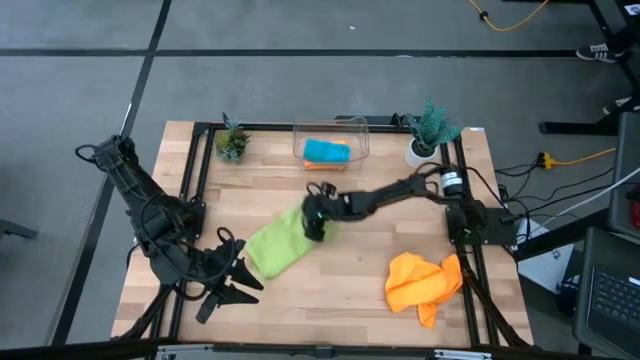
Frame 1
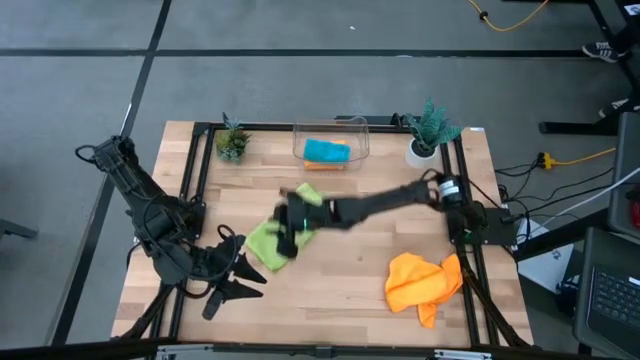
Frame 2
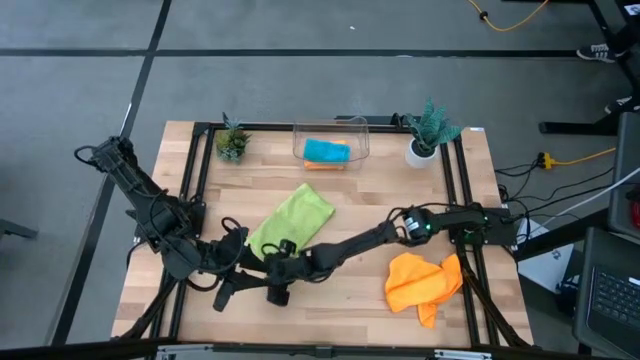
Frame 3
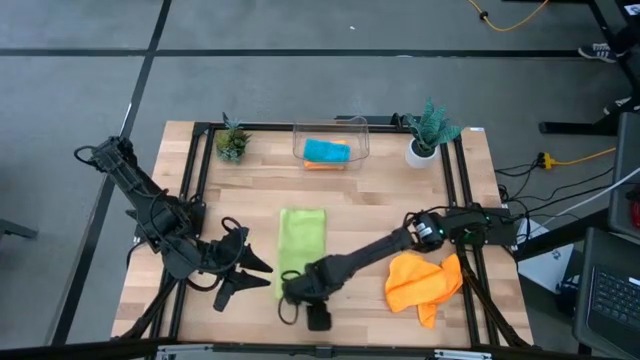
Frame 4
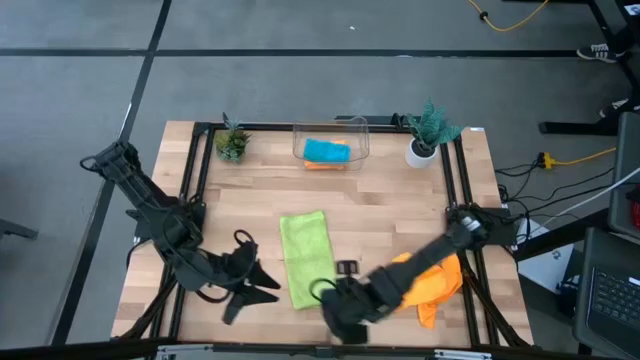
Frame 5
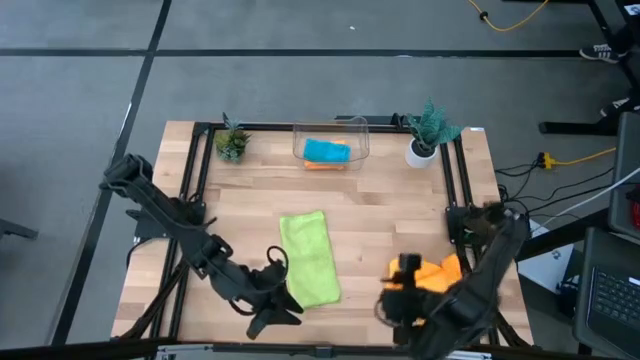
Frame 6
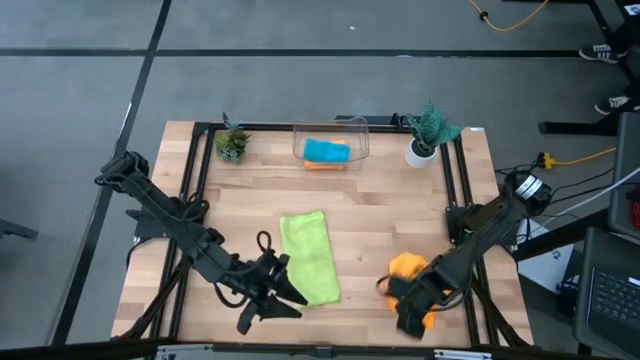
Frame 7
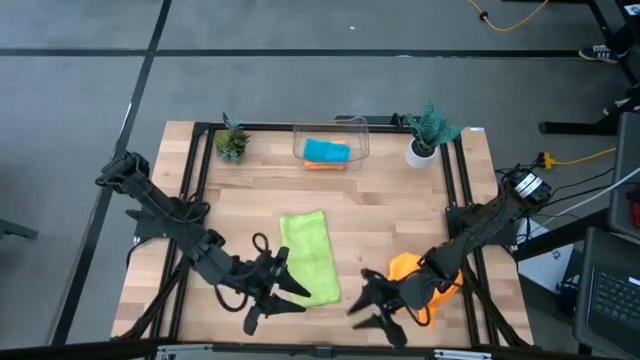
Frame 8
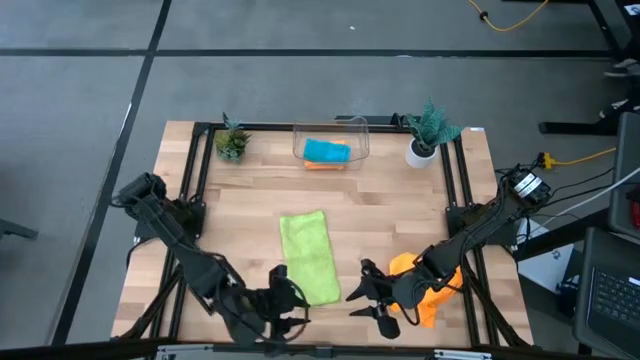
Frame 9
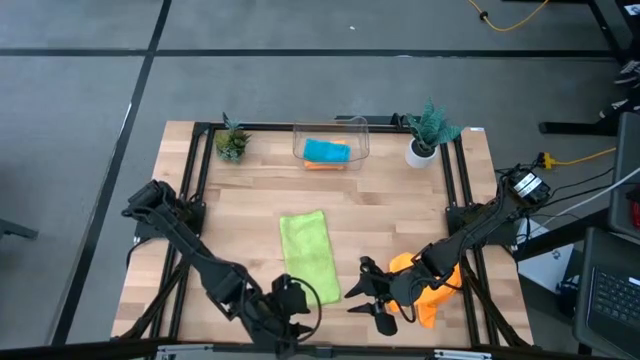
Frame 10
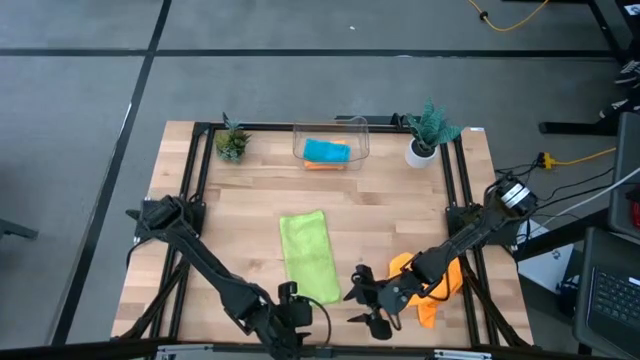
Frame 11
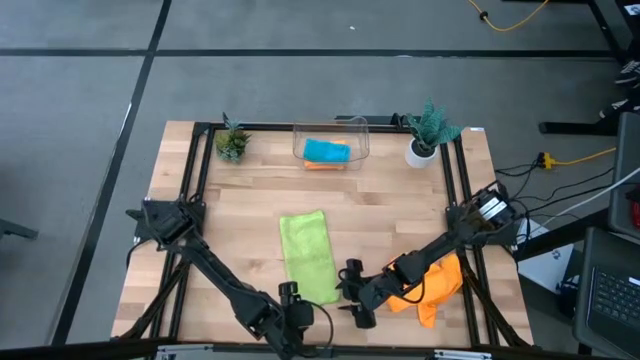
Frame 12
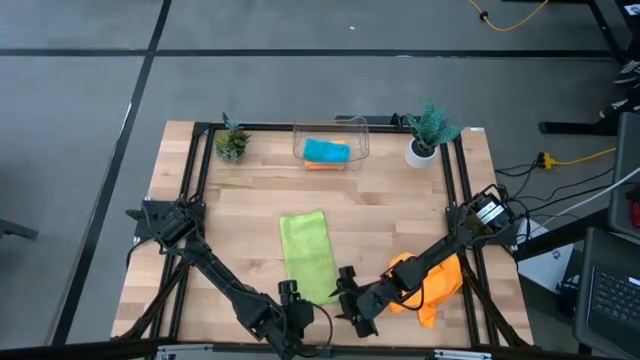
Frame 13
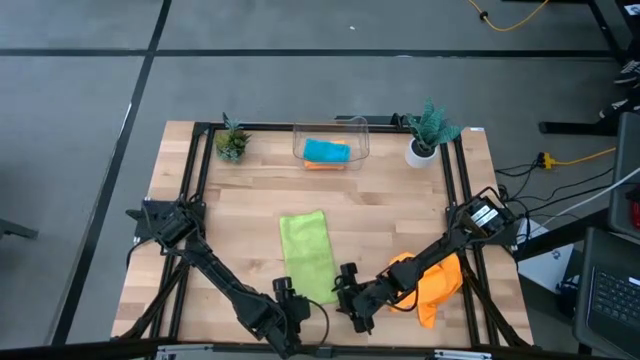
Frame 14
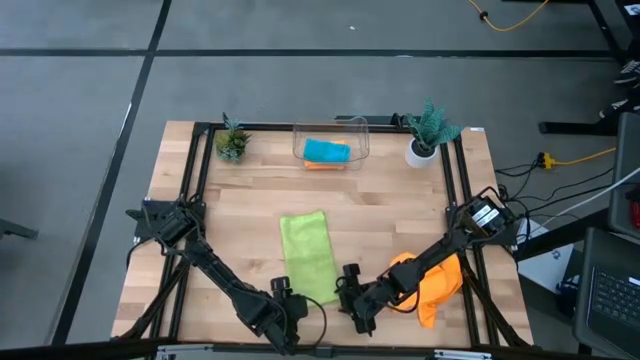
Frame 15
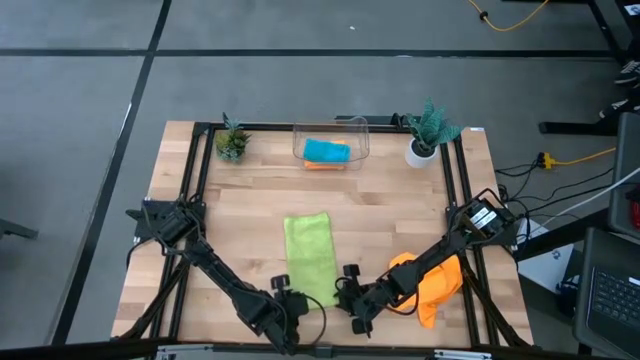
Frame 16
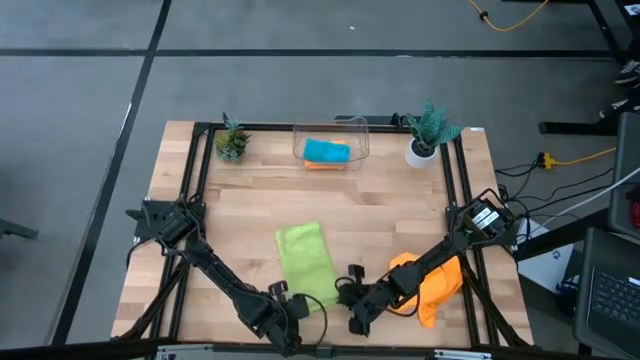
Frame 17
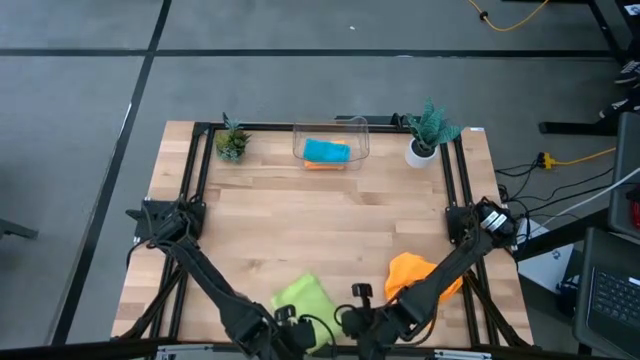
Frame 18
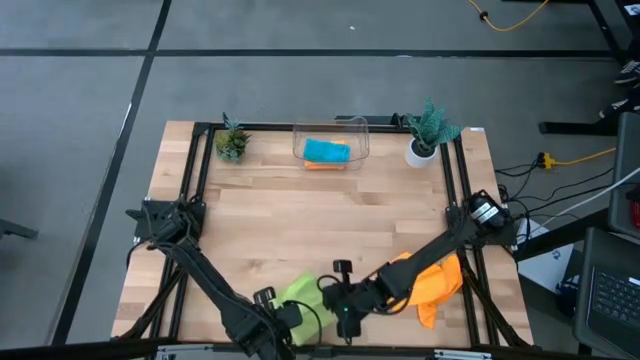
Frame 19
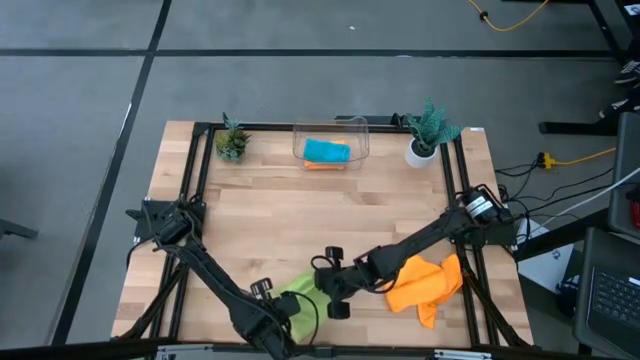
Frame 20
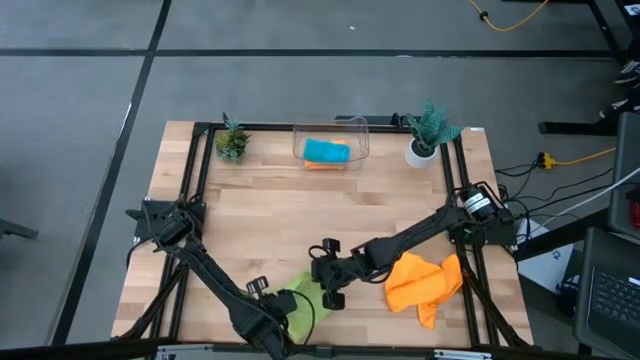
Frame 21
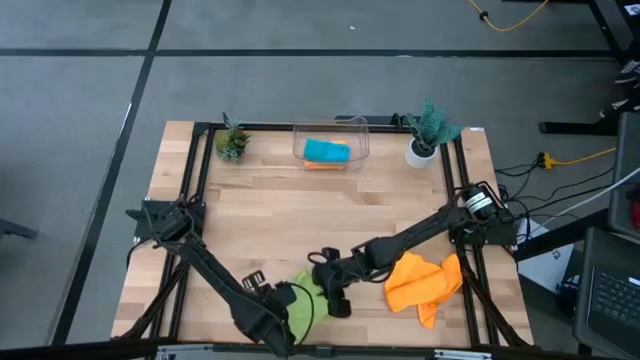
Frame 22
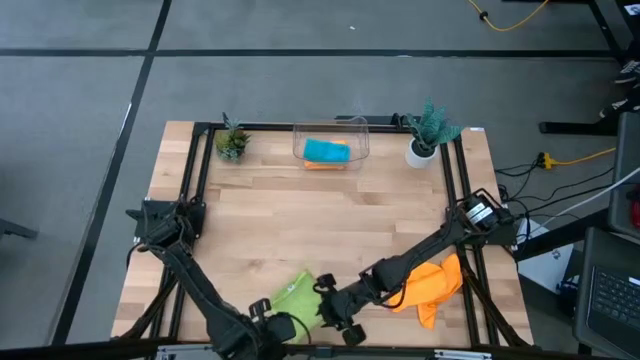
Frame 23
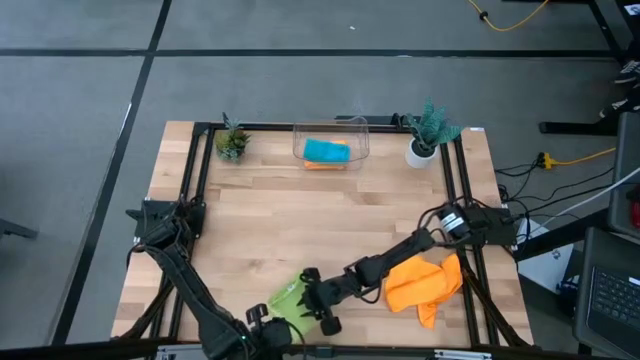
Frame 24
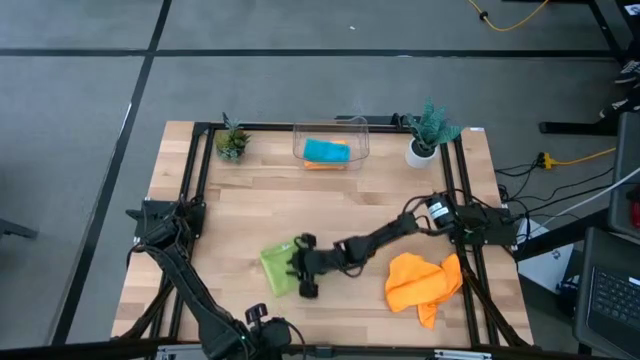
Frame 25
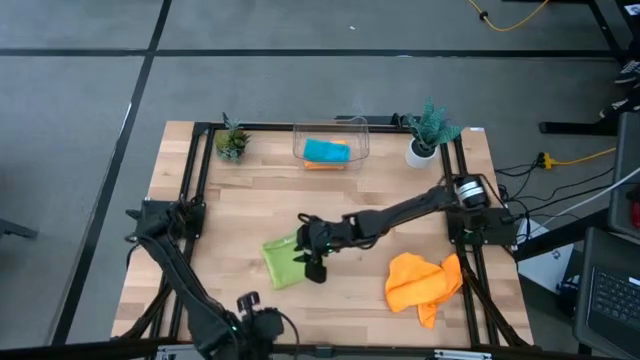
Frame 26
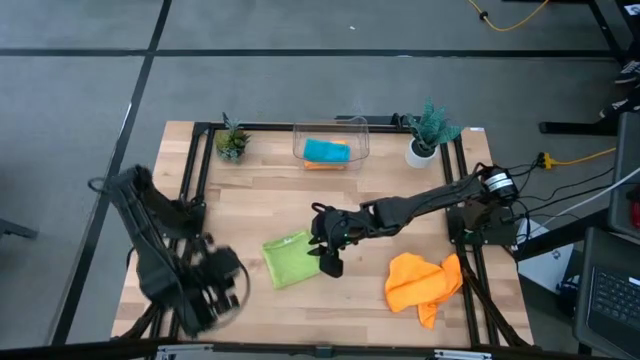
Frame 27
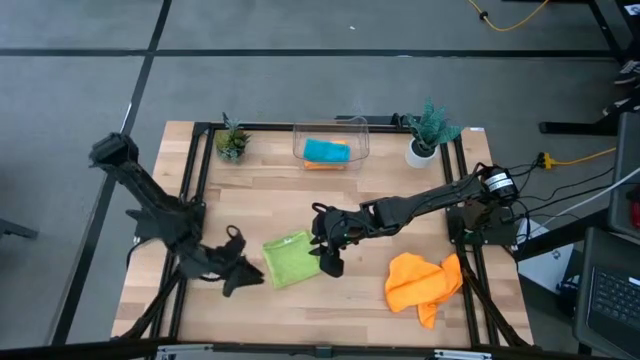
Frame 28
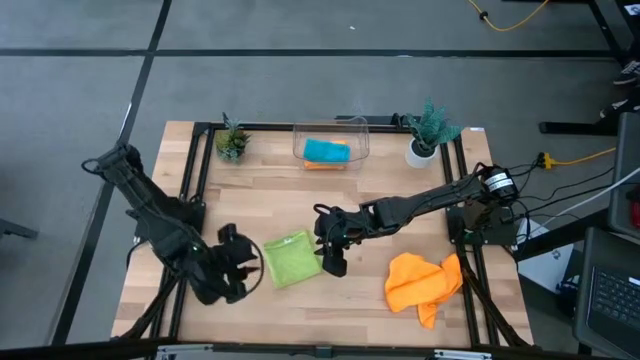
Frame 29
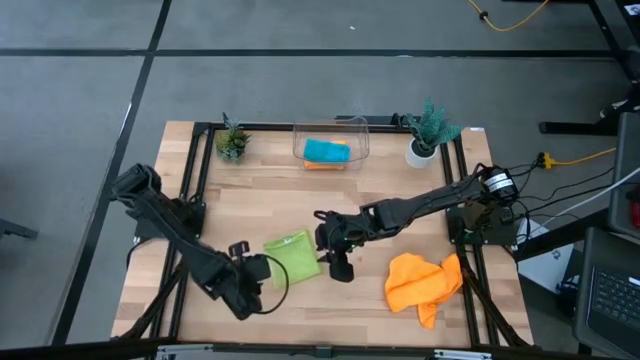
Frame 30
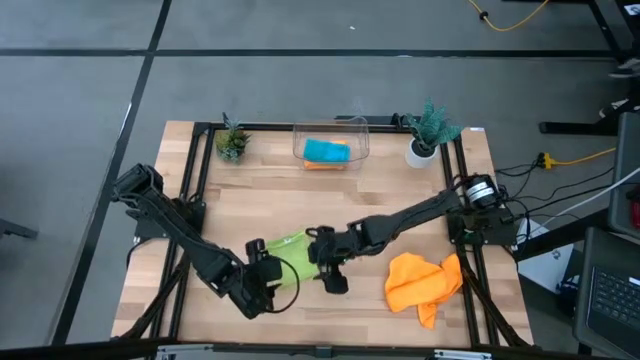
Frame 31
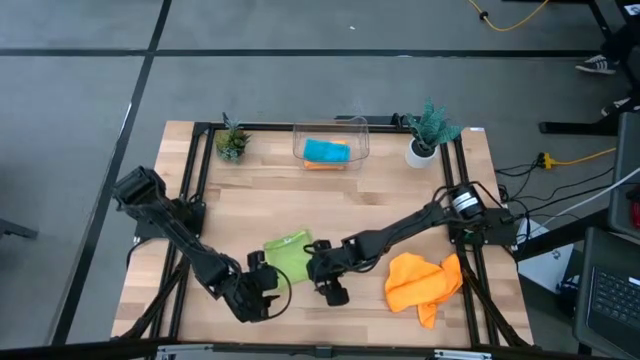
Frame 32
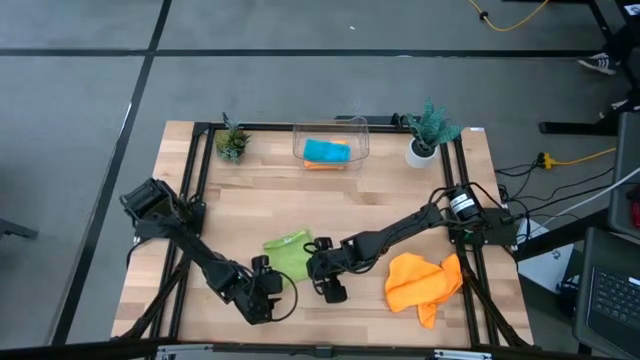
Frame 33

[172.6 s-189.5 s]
Task: Fold microfiber towels
Fold the green towel

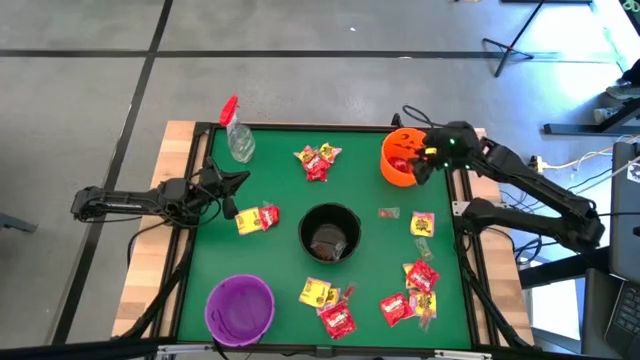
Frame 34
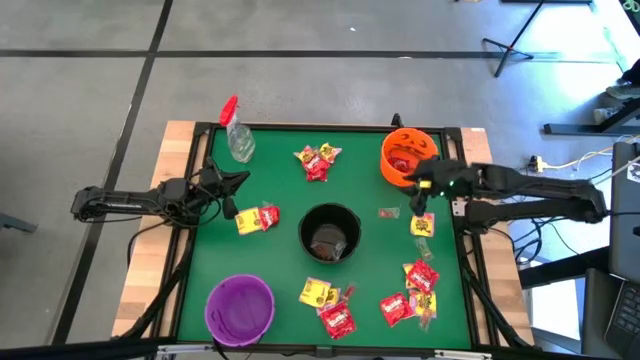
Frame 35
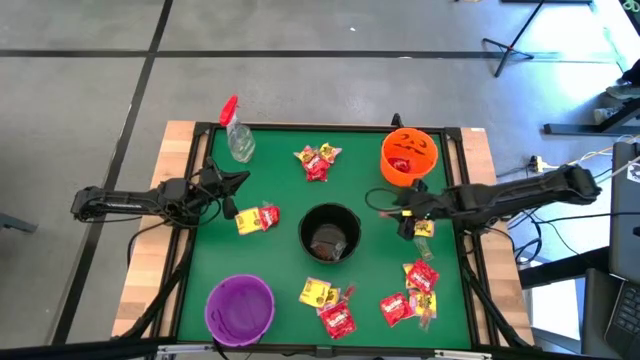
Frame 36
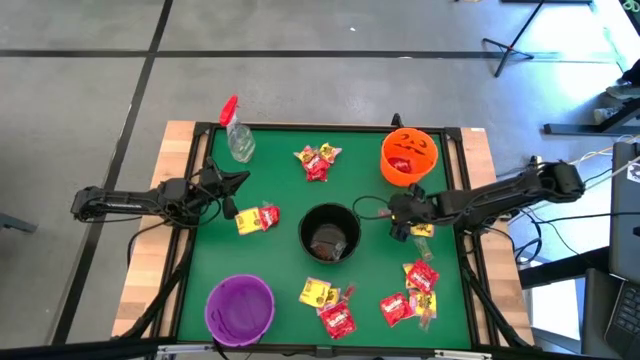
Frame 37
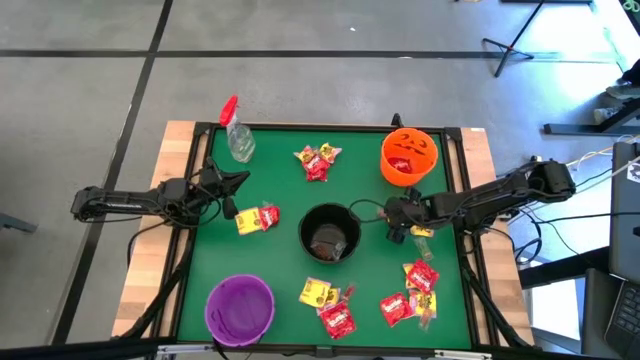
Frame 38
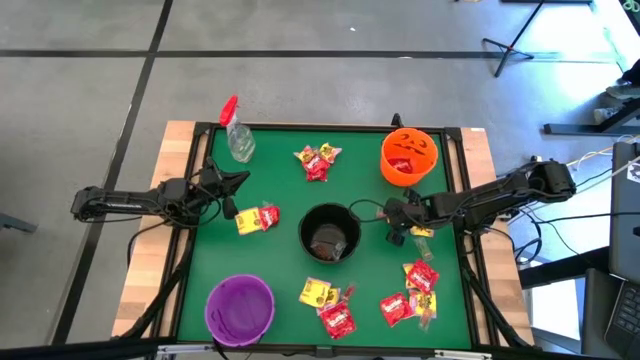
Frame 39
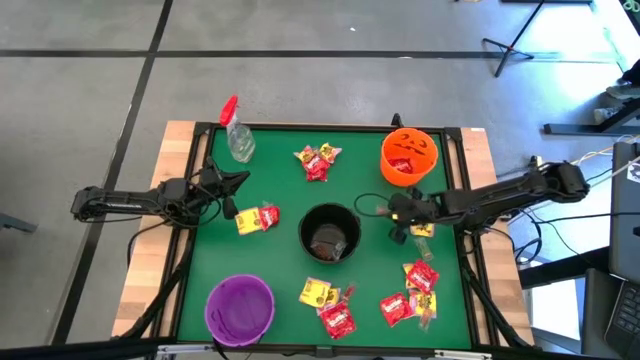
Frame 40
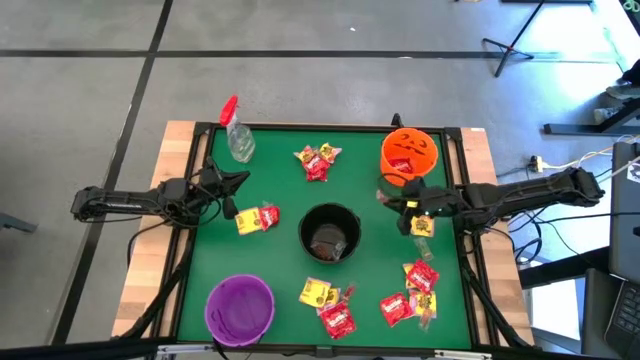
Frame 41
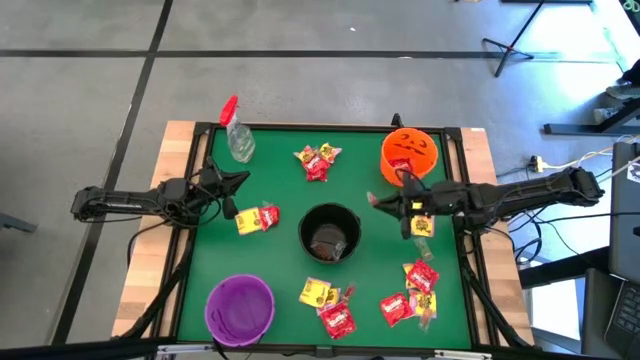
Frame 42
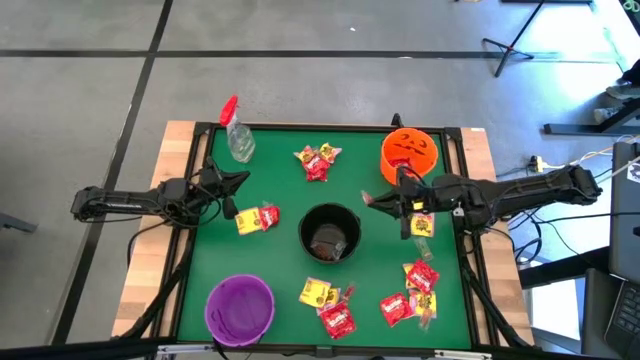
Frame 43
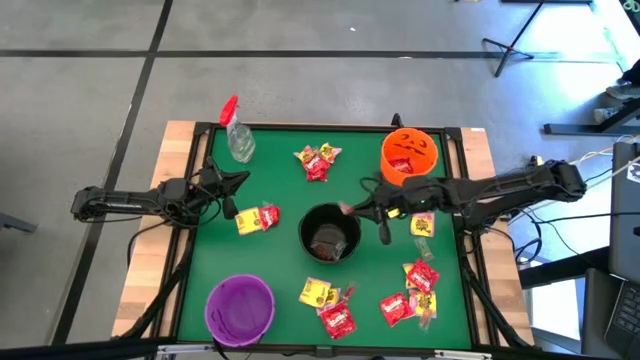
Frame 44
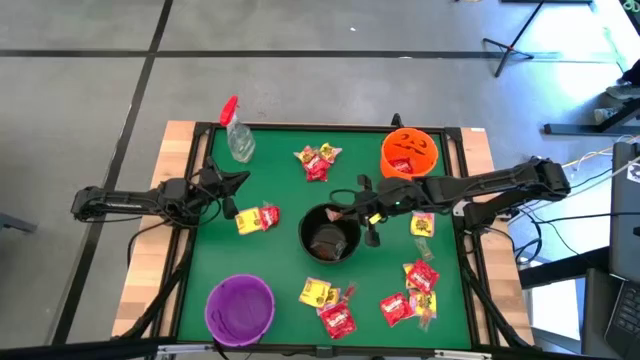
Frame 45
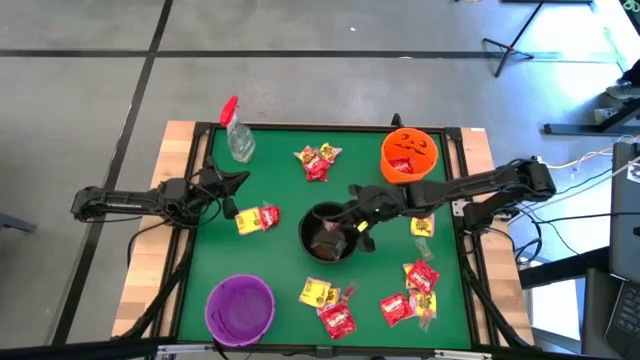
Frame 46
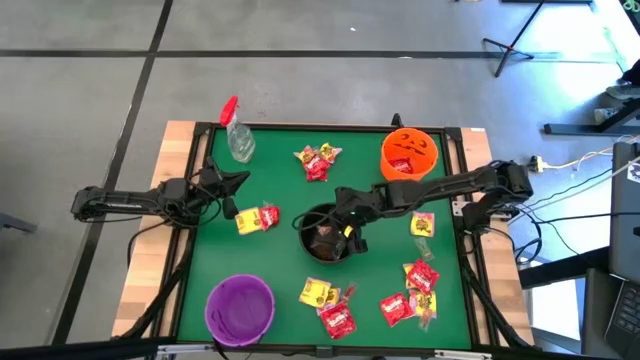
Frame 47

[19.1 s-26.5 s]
Task: Sort candy
Put the orange candy into the black bucket
